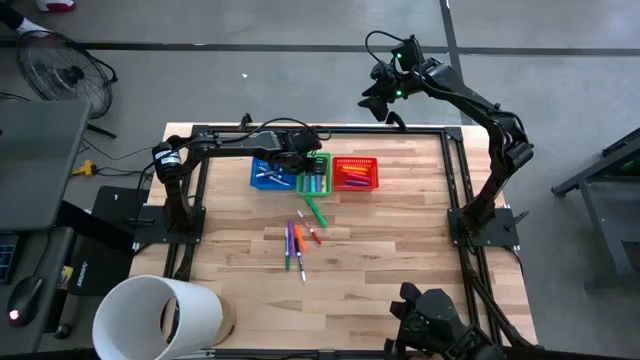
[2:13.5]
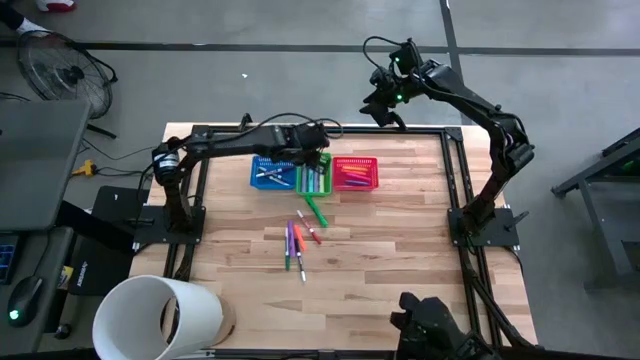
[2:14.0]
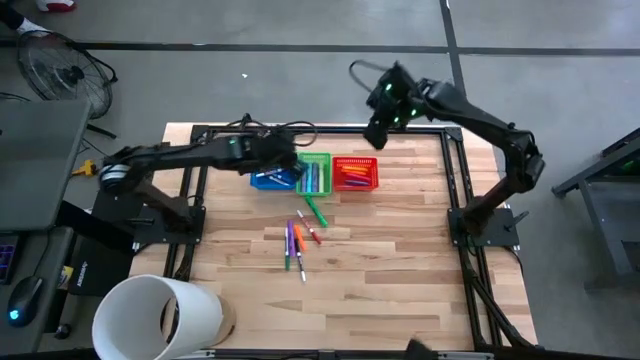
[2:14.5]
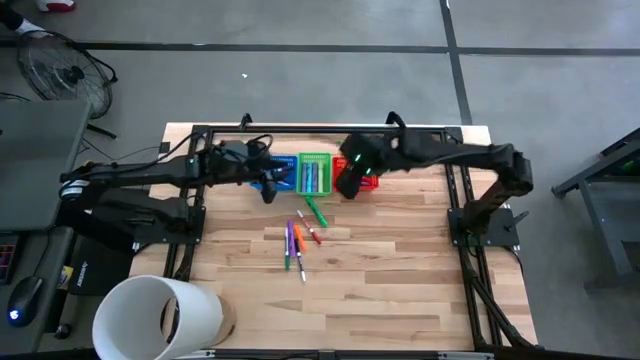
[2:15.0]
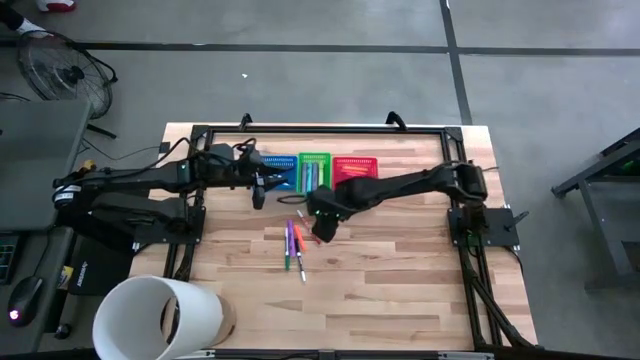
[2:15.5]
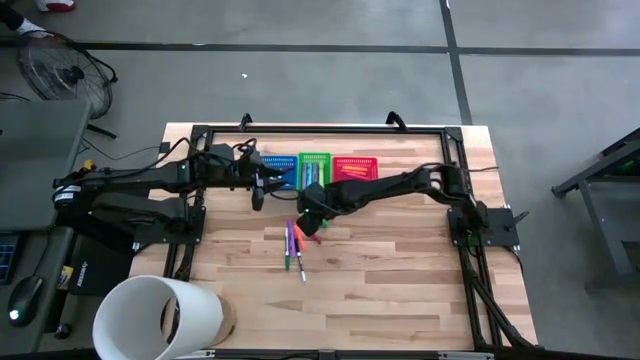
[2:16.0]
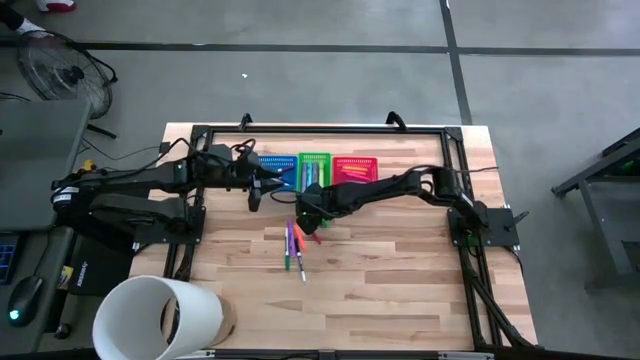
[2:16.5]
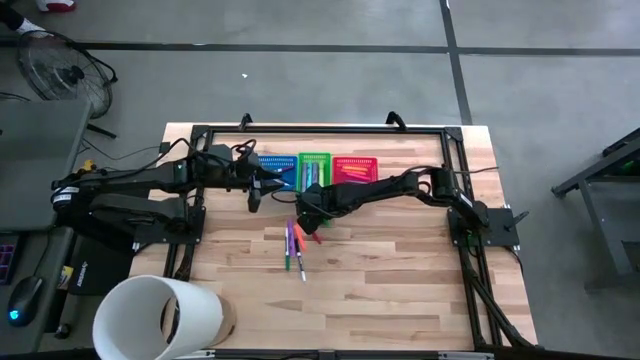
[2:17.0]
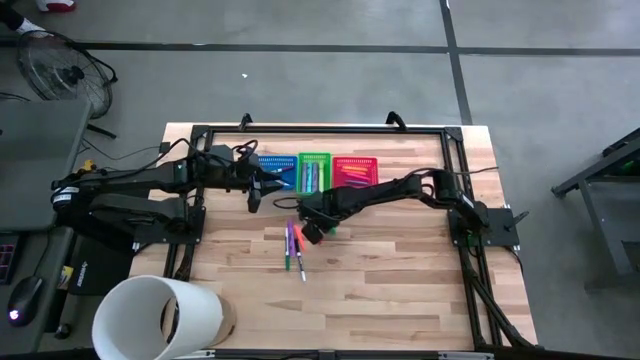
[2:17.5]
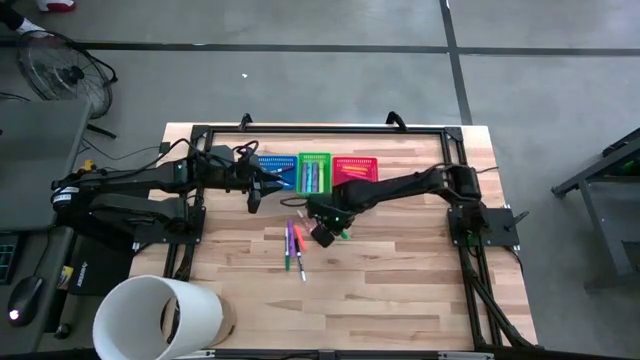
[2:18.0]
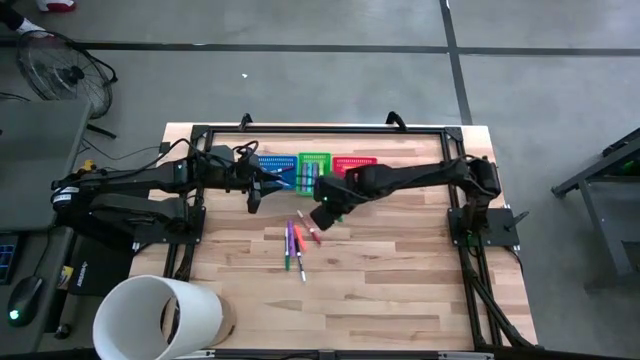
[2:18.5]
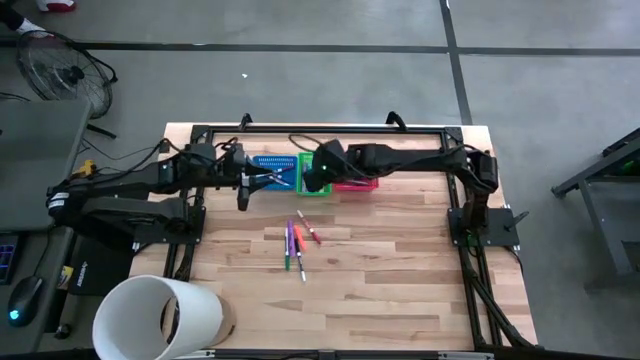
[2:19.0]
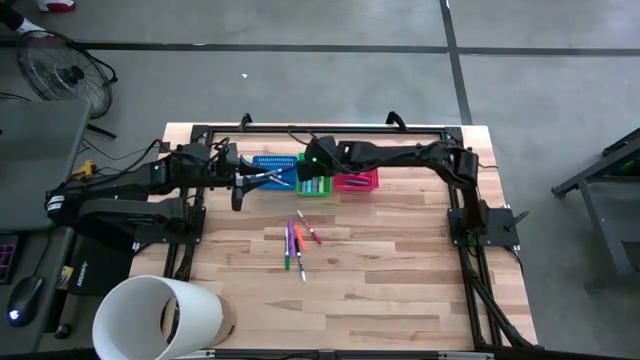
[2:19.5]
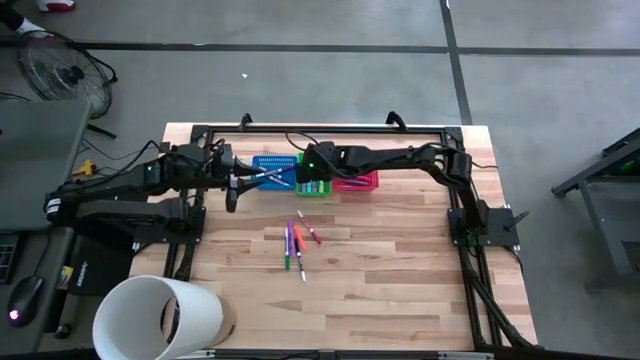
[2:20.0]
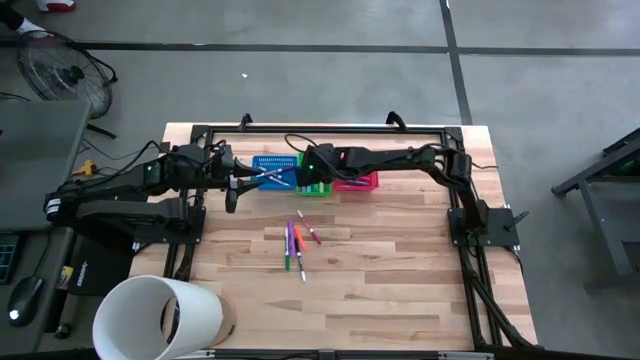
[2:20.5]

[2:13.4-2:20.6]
Task: Pick & Place Markers
Put the green highlighter into the green bin

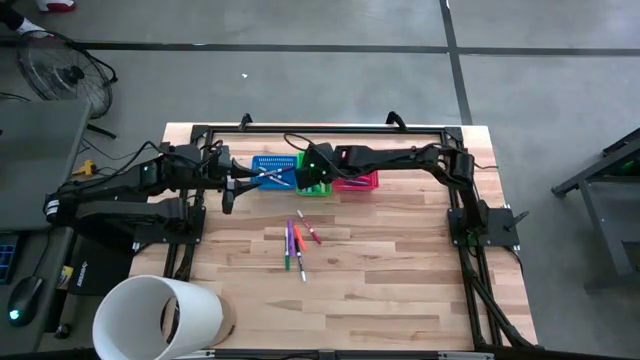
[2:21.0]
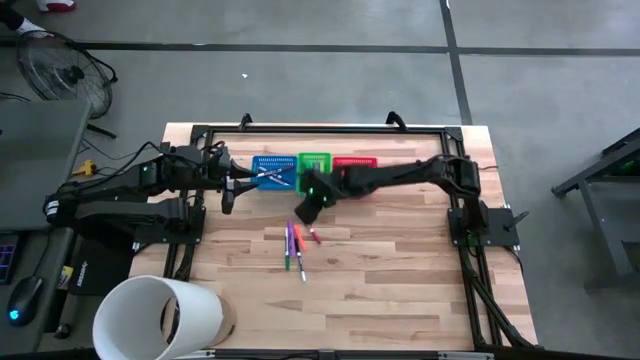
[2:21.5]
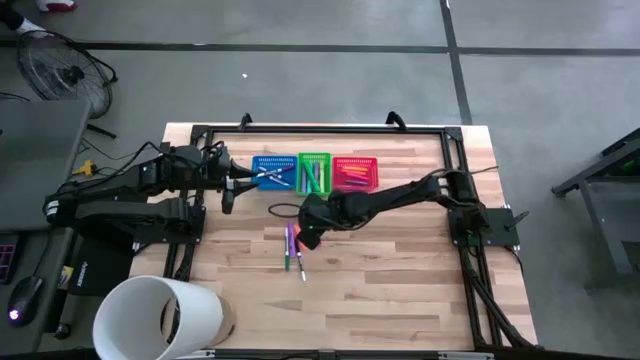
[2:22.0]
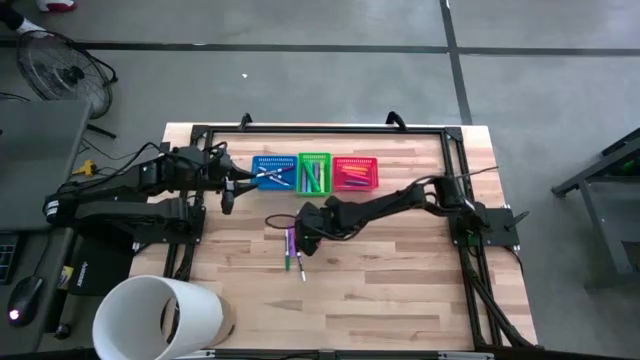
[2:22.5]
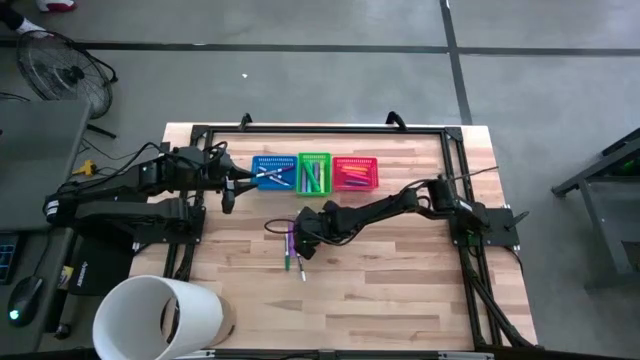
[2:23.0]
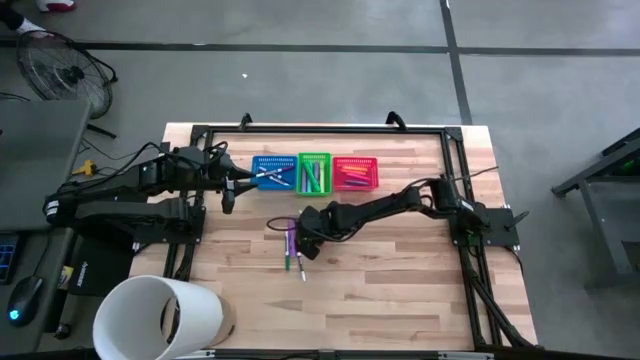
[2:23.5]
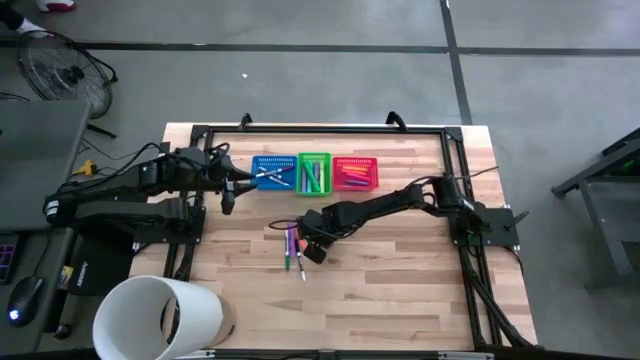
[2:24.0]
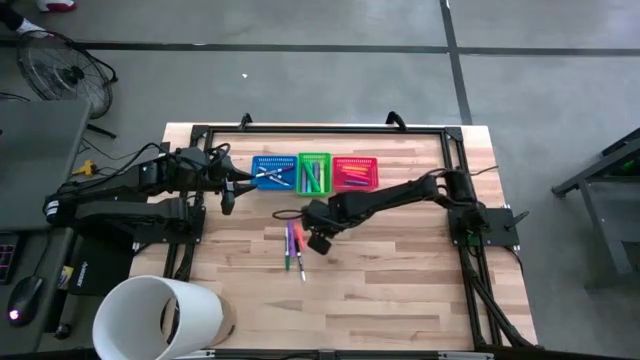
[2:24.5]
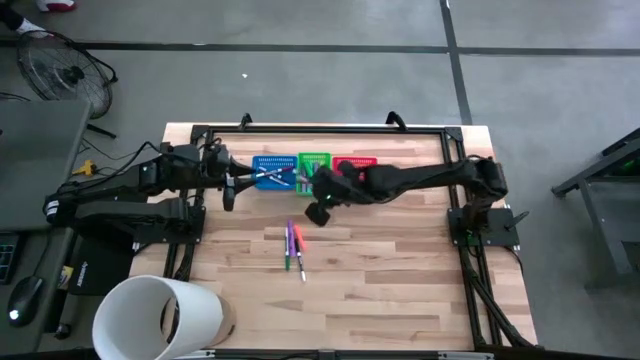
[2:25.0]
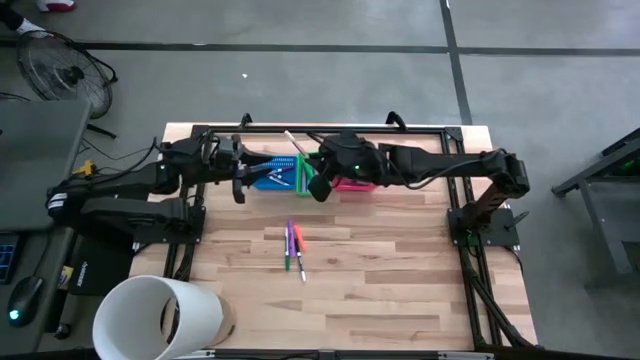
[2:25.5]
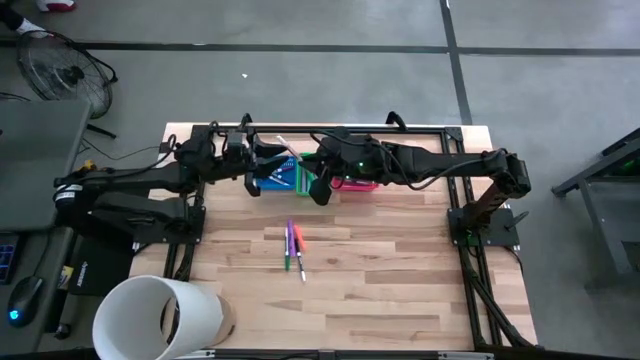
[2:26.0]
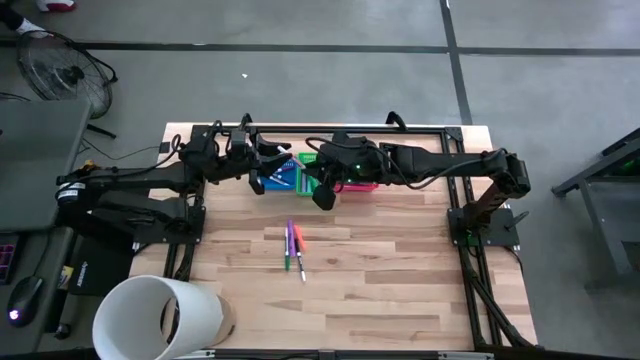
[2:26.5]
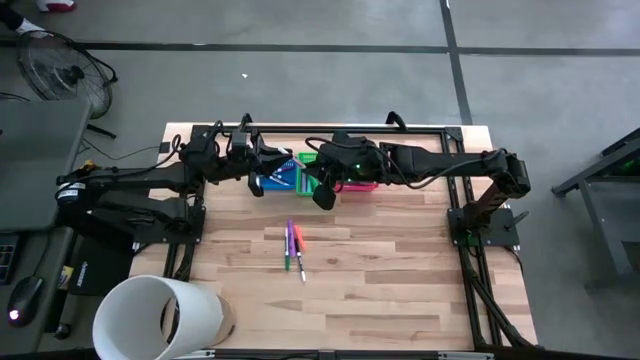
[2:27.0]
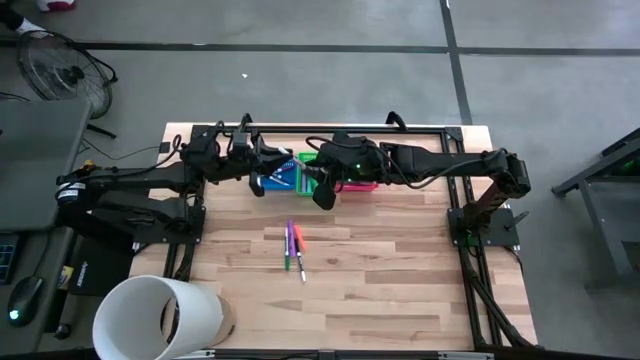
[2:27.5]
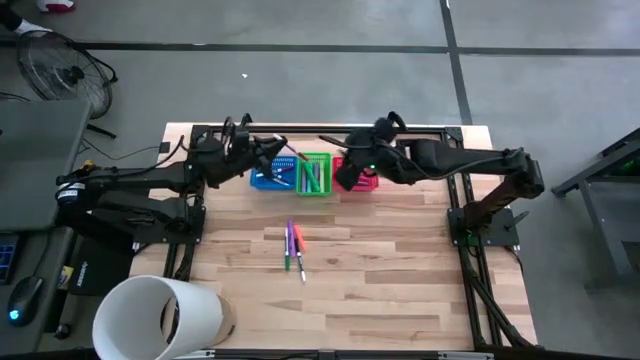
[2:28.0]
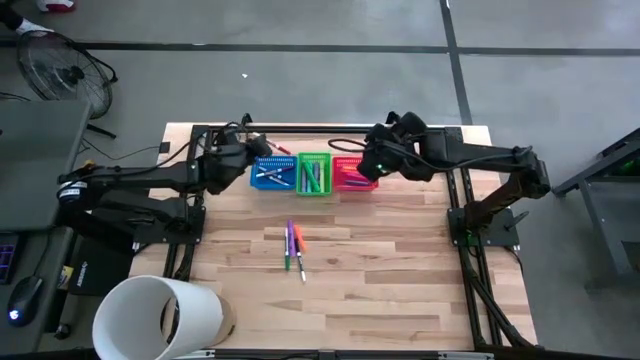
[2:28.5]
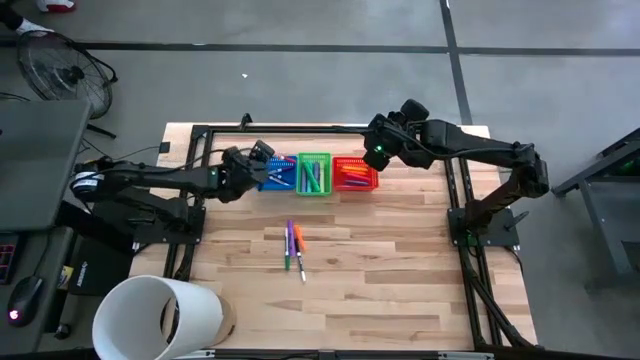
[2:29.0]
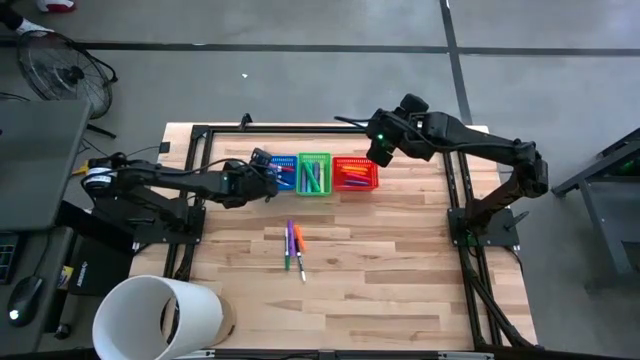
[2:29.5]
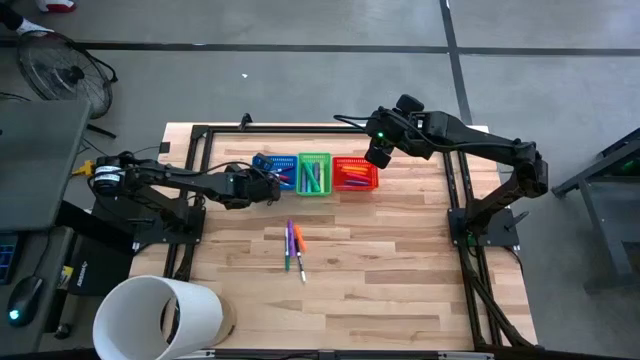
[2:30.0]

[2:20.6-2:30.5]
Put the red marker into the blue bin

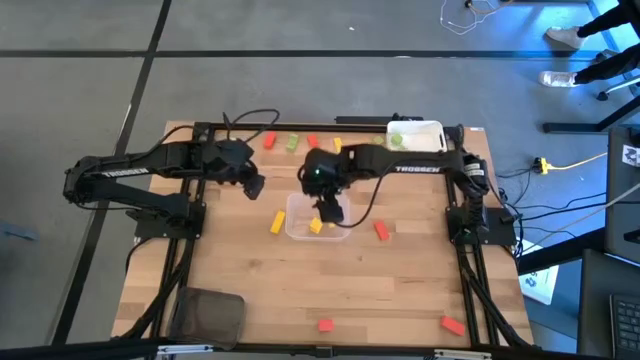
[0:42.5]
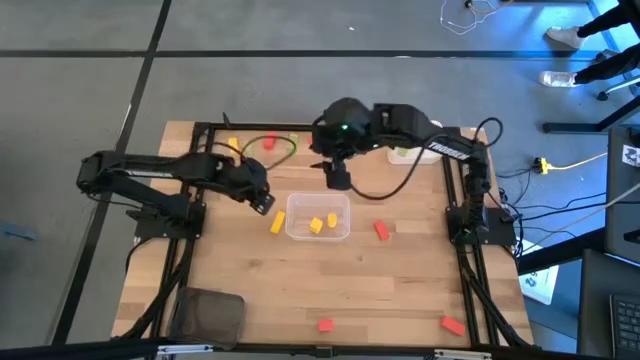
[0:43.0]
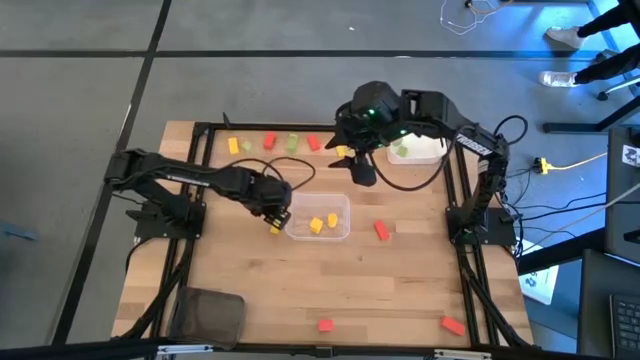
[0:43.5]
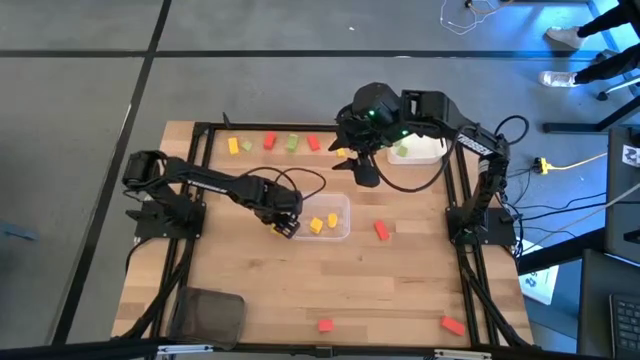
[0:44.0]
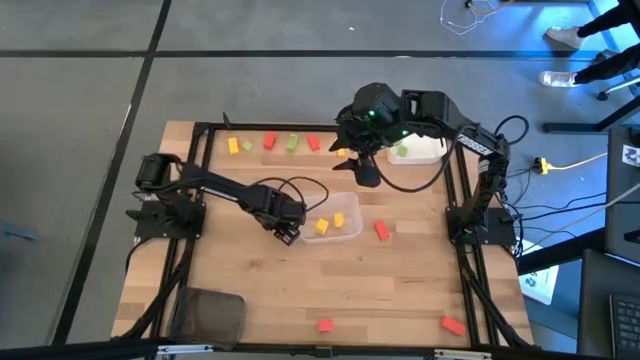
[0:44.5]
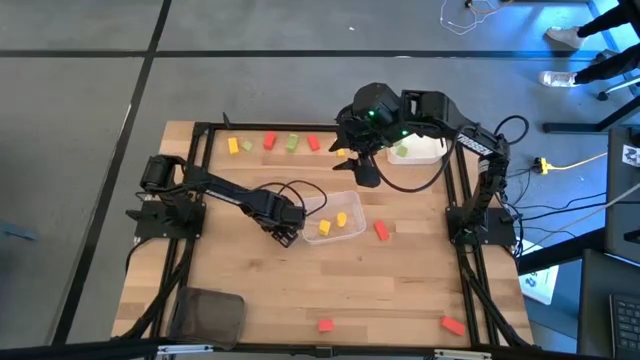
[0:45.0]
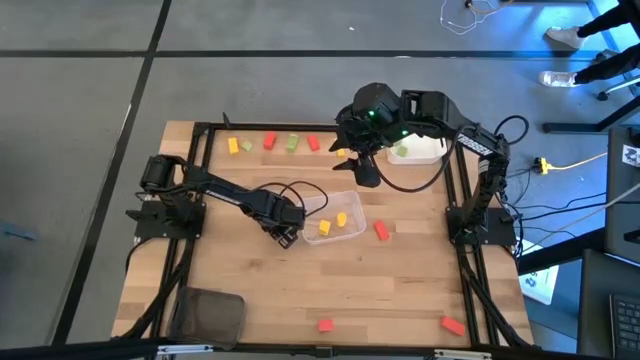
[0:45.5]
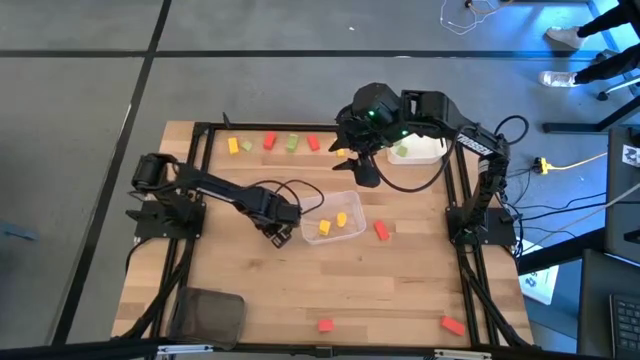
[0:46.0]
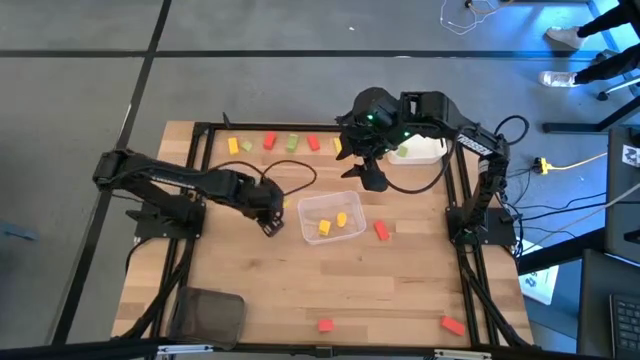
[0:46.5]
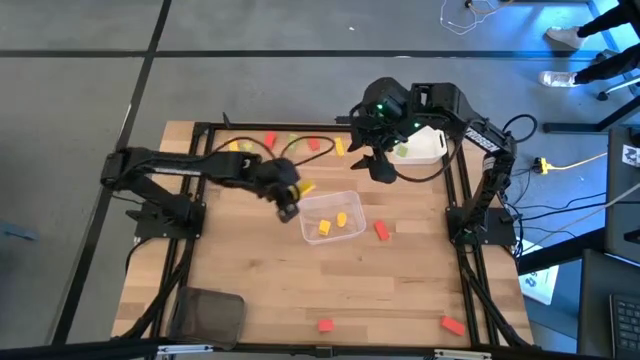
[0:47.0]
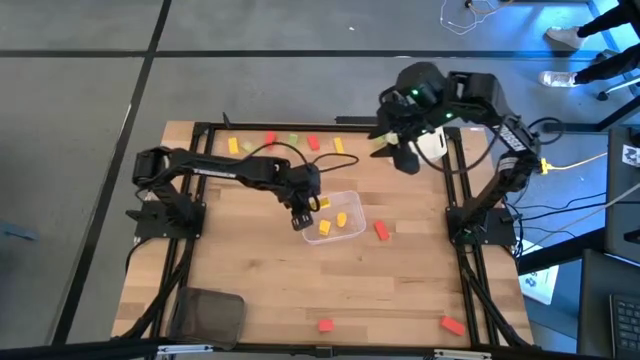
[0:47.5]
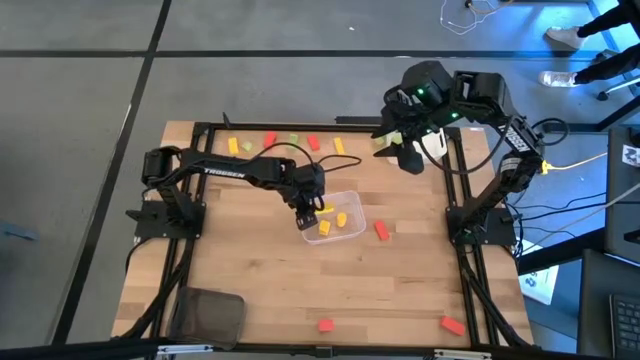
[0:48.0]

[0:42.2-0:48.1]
Task: Sort & place blocks by color
Put the yellow block into the transparent bin
